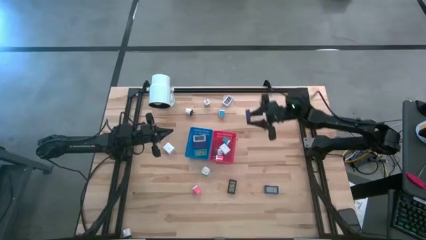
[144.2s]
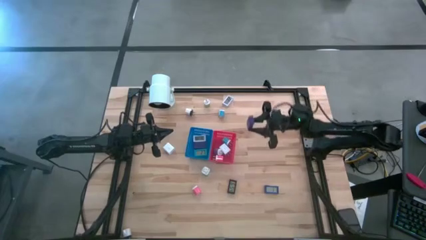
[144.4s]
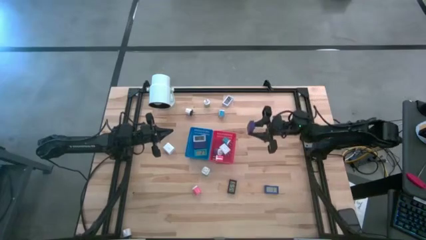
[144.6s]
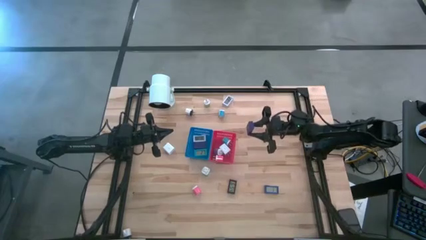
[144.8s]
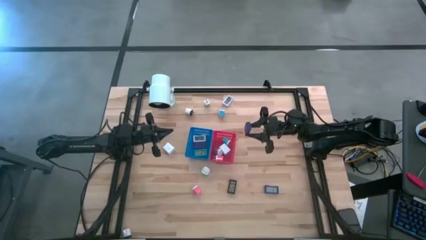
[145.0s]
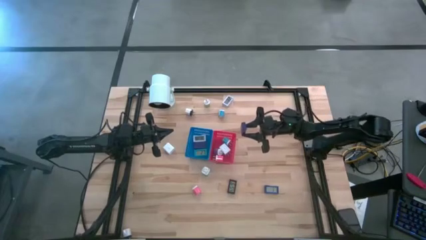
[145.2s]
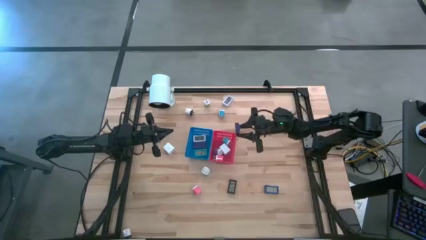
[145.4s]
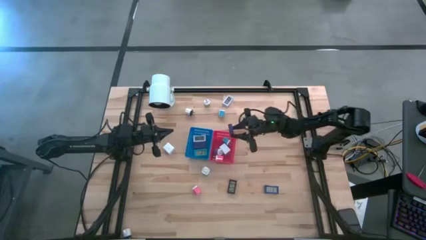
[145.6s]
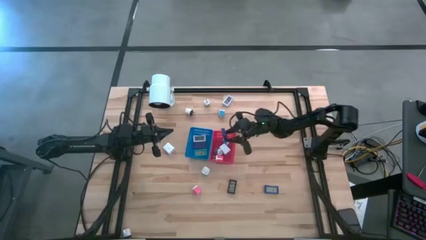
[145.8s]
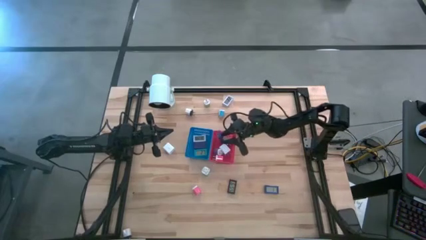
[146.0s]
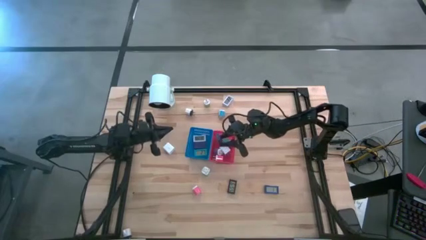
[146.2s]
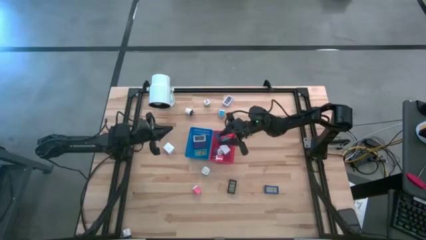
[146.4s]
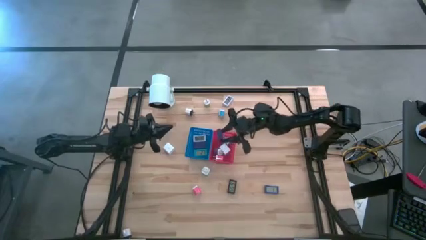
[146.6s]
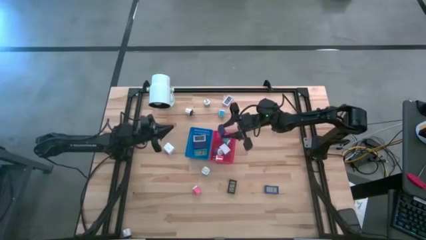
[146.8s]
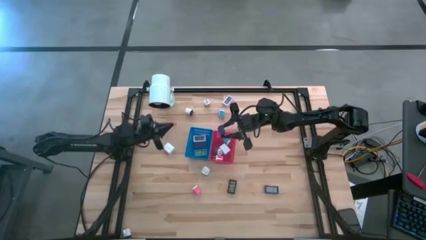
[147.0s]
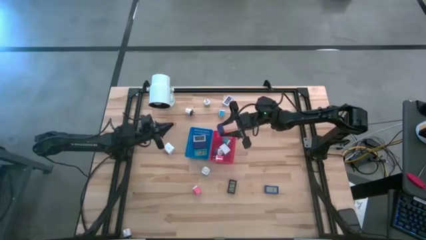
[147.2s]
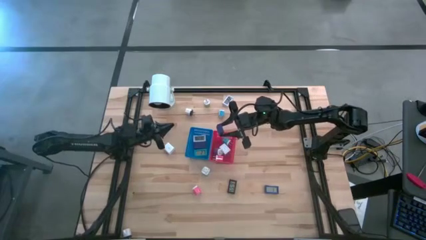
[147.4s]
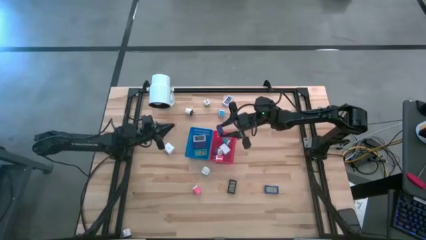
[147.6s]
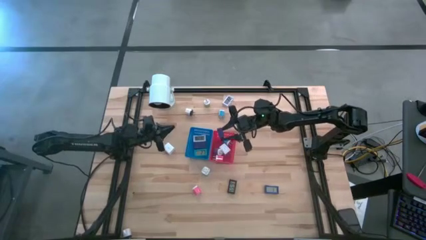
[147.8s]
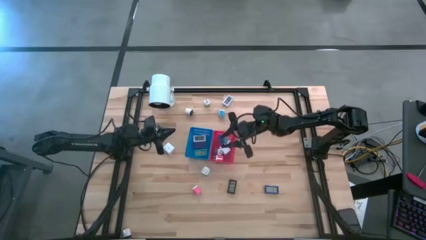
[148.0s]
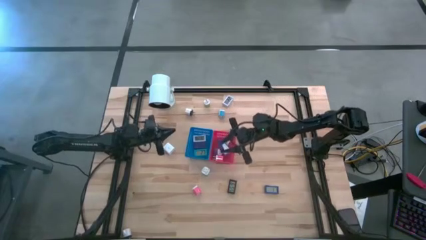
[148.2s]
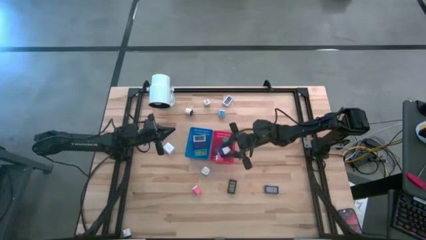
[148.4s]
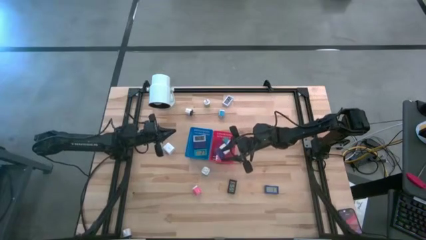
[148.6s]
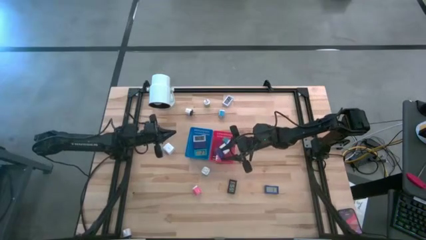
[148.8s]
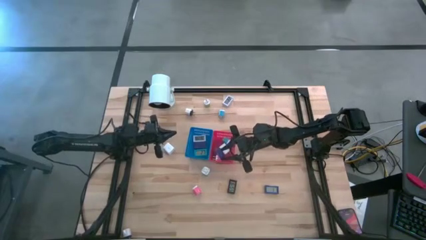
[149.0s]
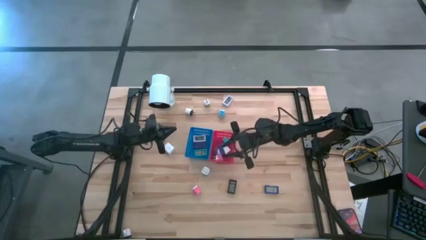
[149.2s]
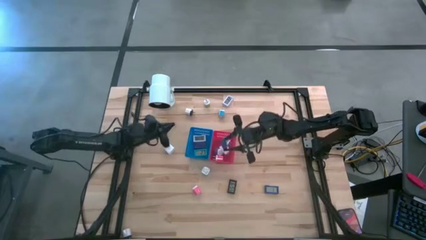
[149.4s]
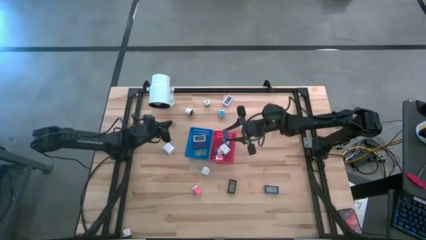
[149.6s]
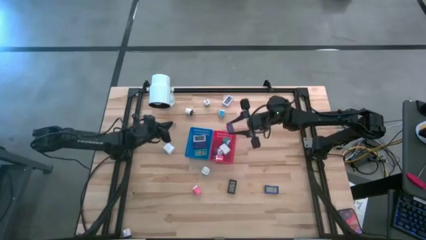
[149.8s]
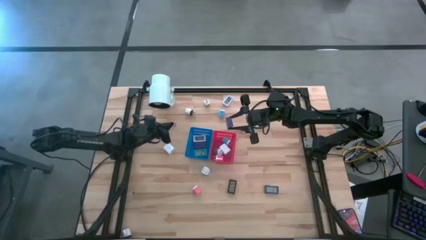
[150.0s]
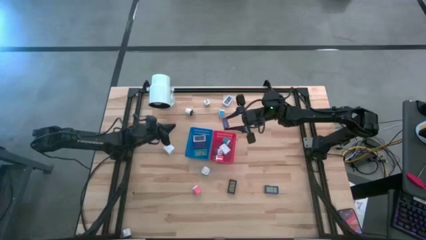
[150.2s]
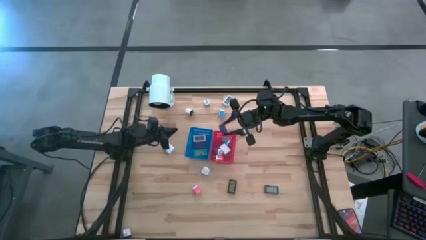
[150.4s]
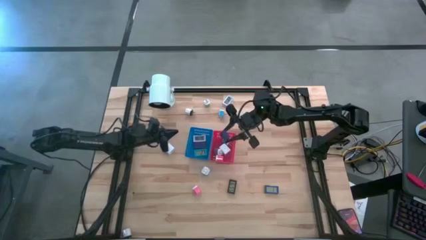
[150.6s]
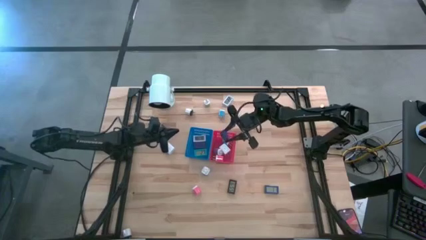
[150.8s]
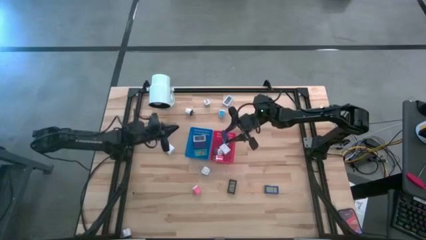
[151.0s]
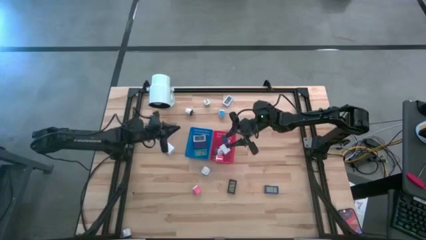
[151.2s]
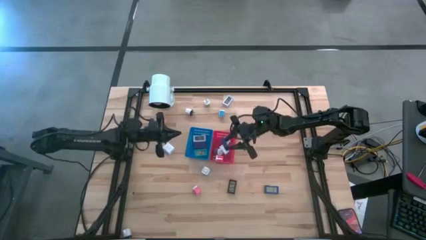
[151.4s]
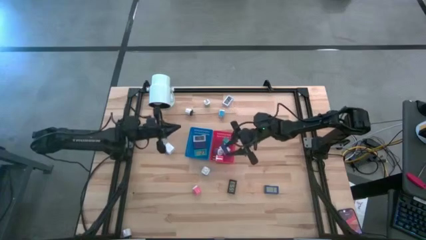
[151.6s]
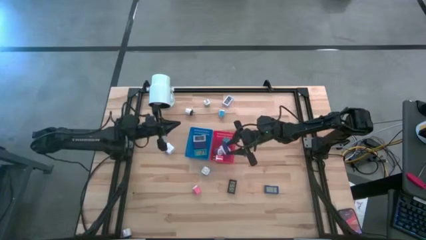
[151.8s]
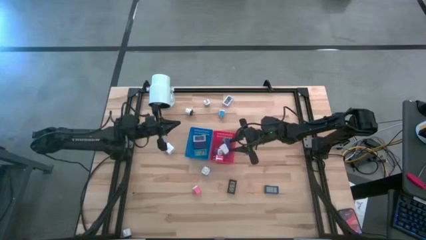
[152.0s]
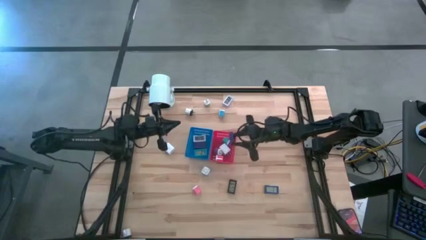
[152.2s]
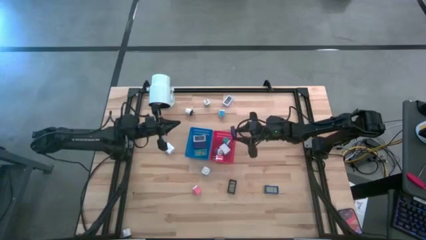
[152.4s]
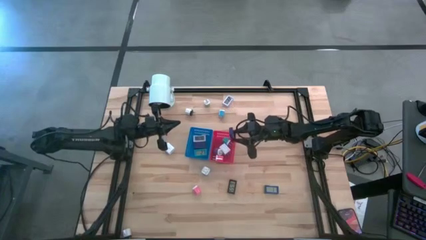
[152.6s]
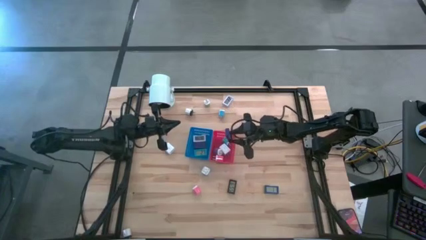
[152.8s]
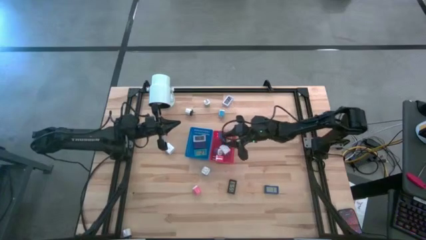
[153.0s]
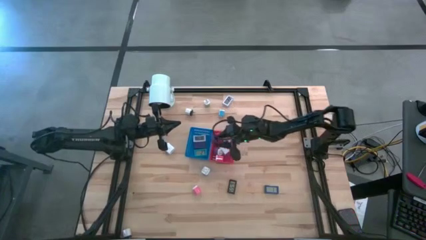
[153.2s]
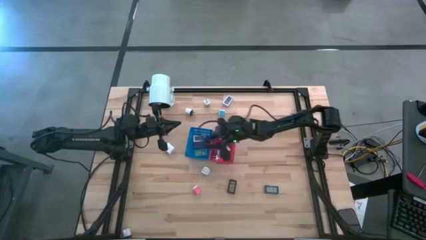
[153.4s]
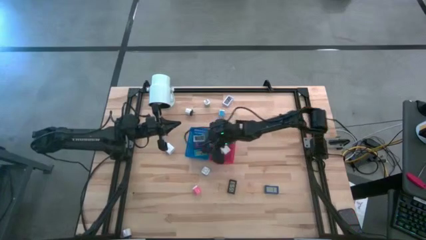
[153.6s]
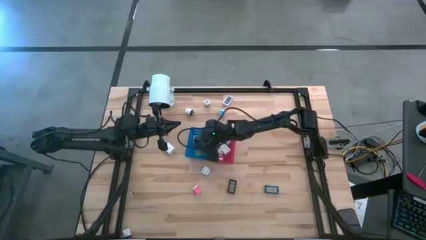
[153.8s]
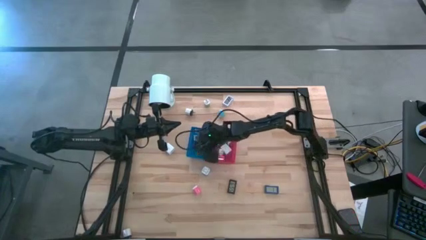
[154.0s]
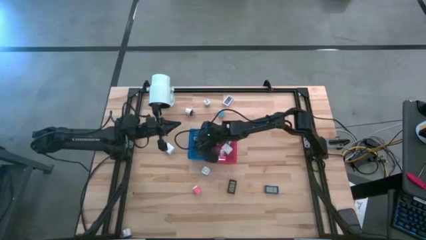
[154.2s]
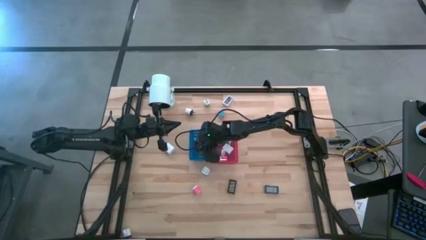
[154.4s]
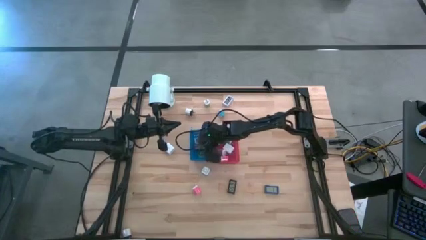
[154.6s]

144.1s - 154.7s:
Task: Pick & Place Office items
Put the dark blue digital clock into the blue bin

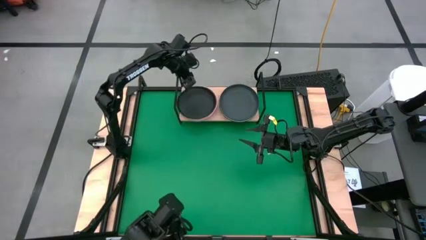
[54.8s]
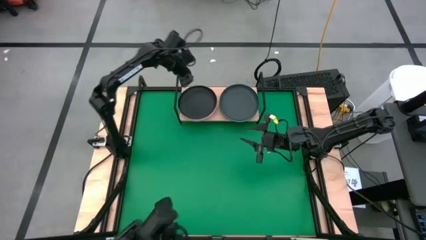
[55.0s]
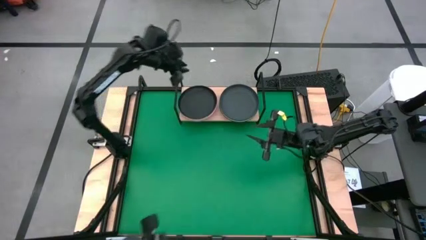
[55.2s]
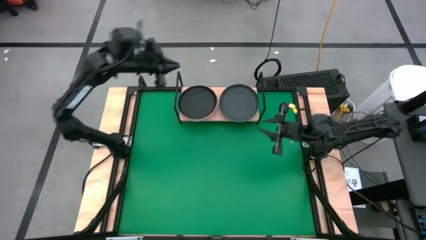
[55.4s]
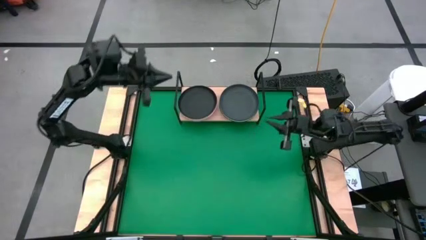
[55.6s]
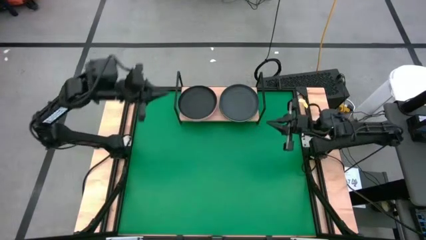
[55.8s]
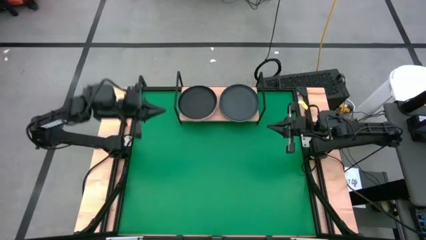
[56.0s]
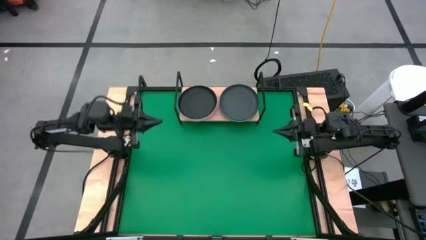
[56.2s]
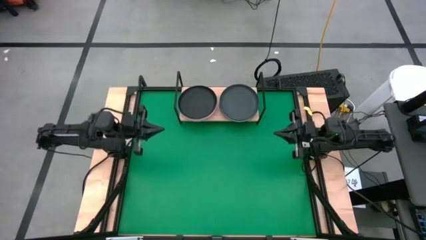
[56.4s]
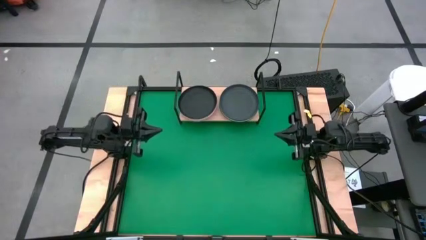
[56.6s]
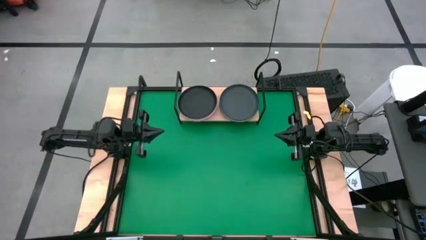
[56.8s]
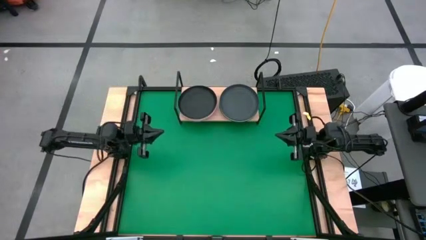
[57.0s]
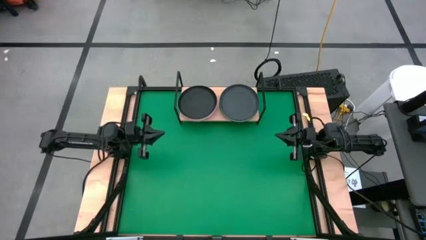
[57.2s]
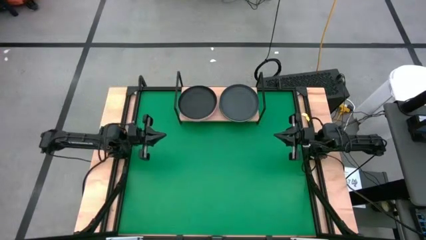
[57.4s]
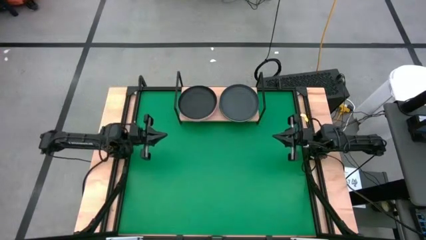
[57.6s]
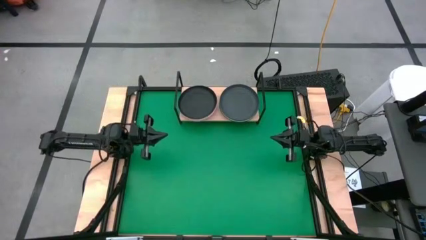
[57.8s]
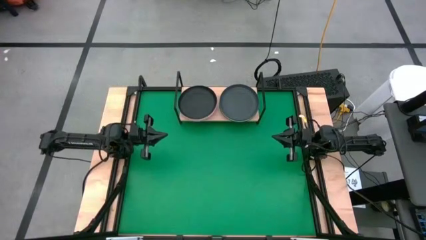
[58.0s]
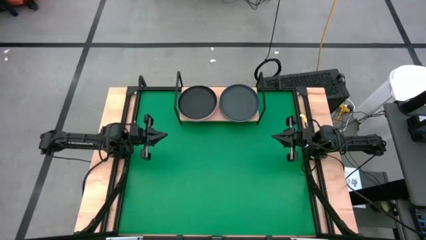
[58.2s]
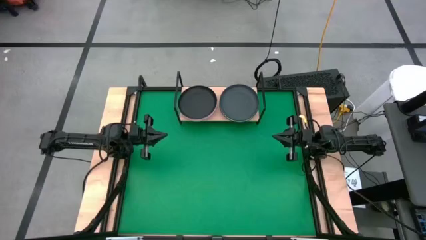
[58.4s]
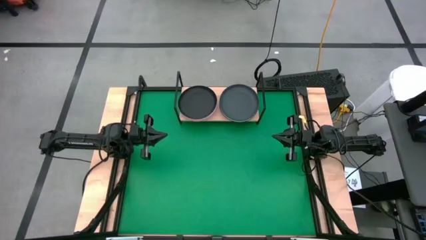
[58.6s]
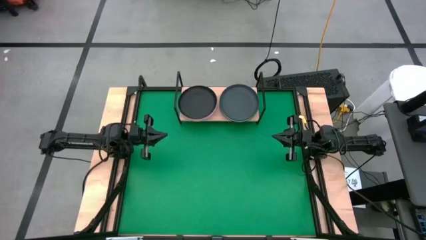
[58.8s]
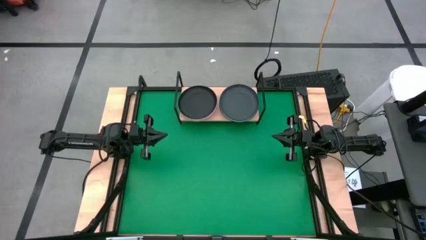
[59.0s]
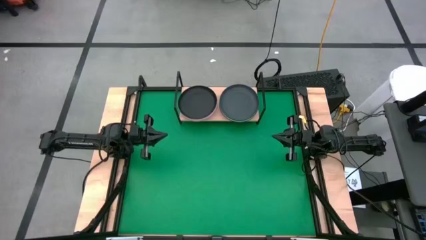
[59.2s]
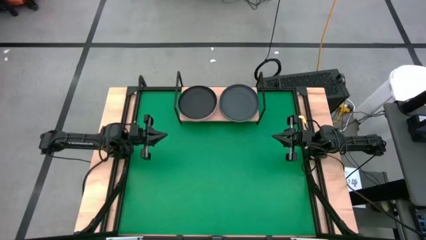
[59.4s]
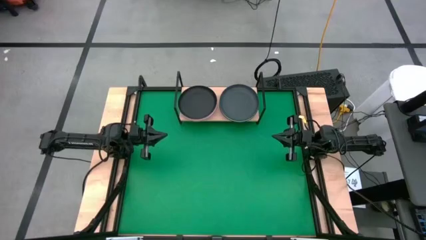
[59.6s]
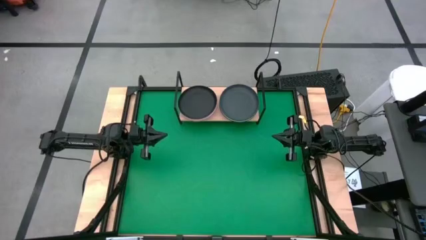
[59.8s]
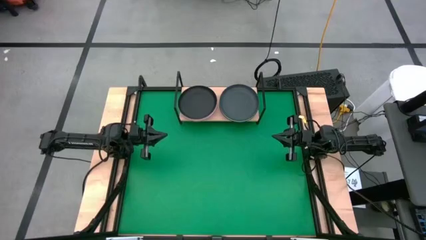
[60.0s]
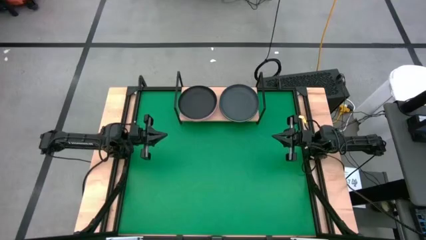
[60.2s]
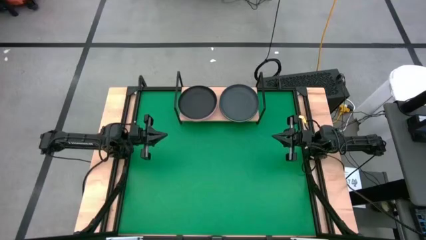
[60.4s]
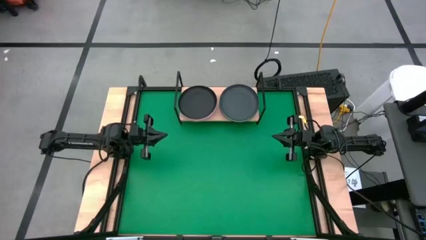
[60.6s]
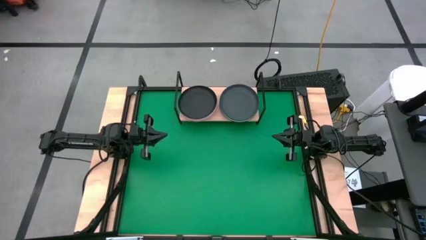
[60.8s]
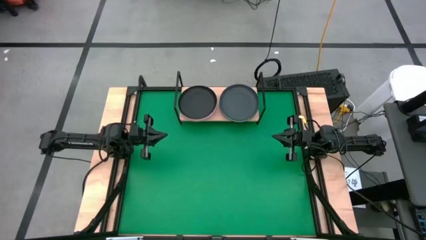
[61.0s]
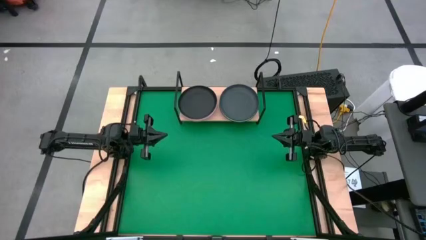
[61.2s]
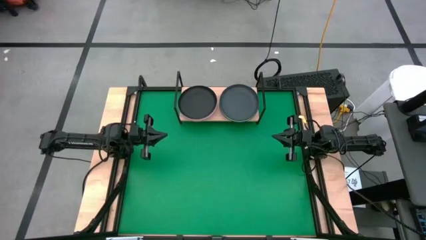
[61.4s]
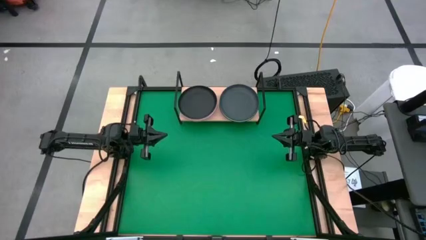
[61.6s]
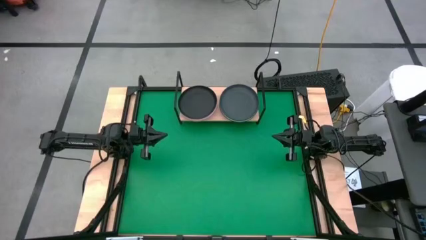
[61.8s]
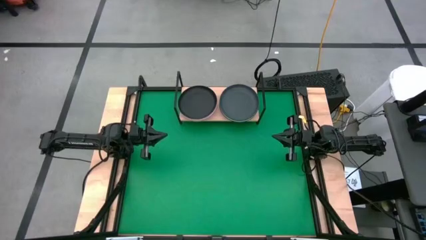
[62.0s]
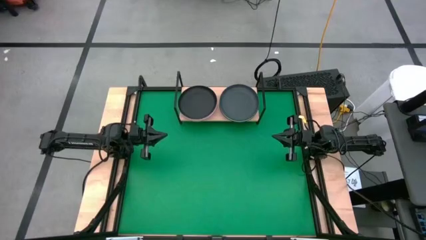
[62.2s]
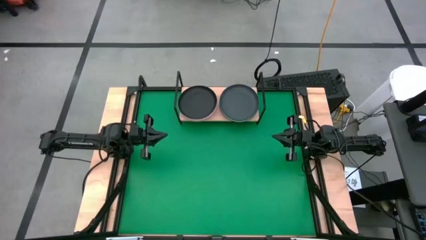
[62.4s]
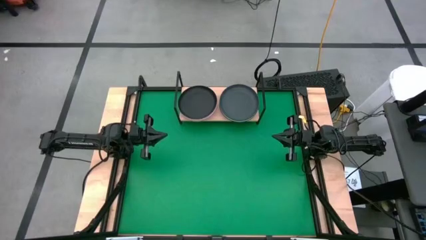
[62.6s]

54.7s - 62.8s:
Task: Place and stack plates onto a shelf
Return to Home Position
